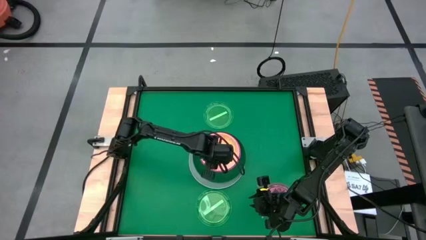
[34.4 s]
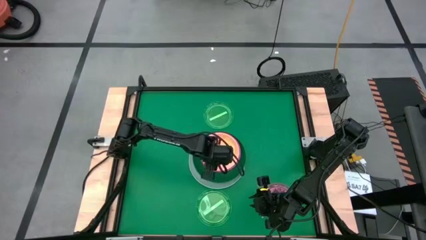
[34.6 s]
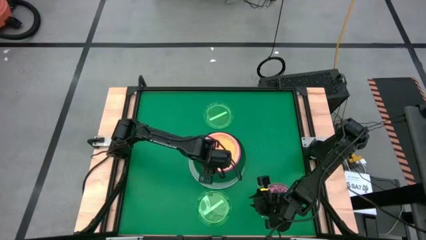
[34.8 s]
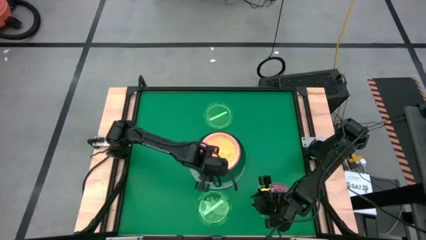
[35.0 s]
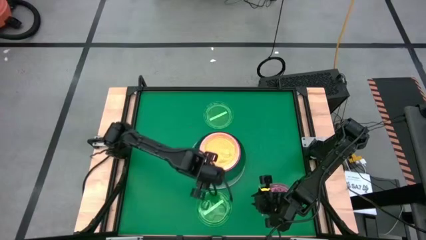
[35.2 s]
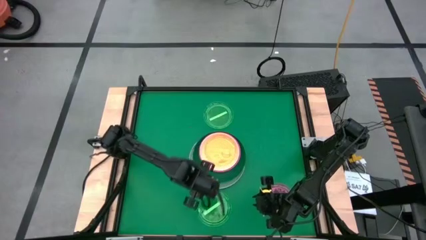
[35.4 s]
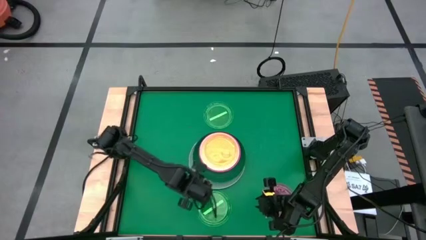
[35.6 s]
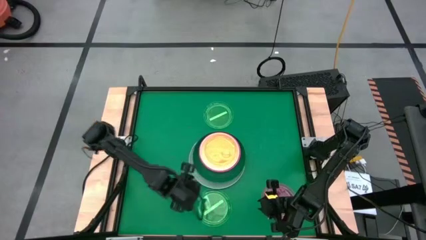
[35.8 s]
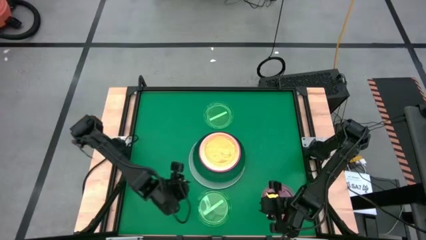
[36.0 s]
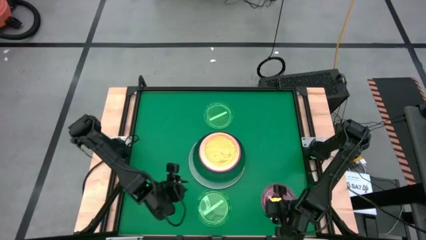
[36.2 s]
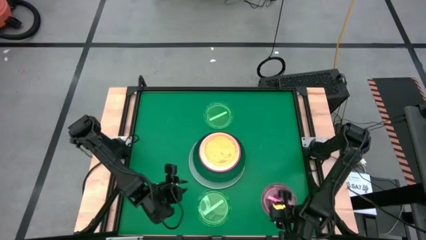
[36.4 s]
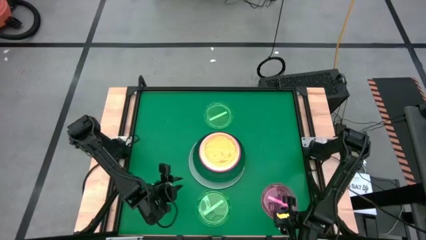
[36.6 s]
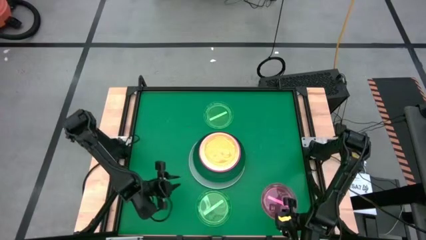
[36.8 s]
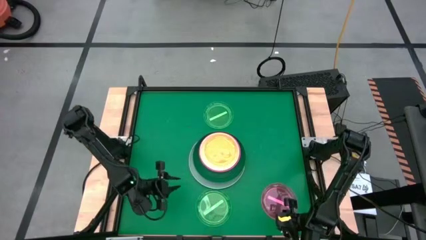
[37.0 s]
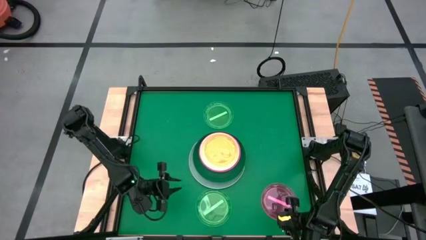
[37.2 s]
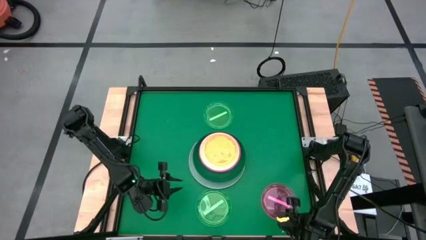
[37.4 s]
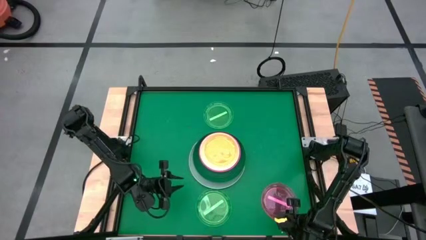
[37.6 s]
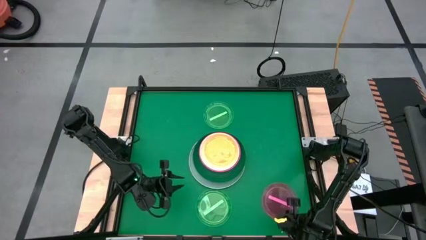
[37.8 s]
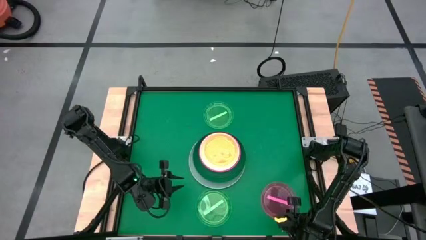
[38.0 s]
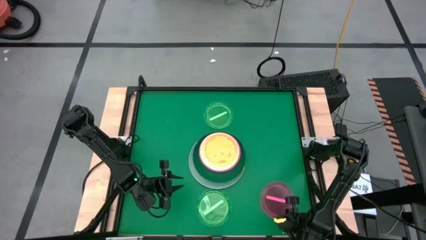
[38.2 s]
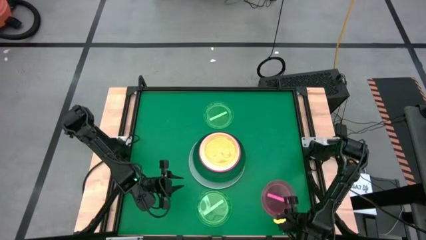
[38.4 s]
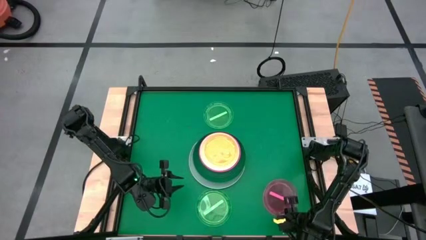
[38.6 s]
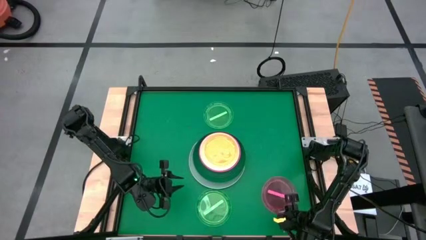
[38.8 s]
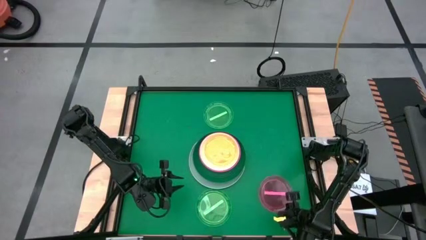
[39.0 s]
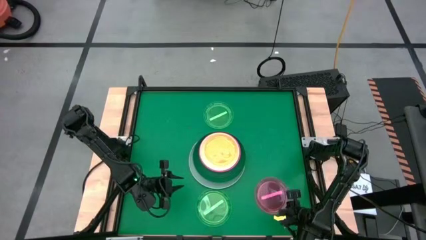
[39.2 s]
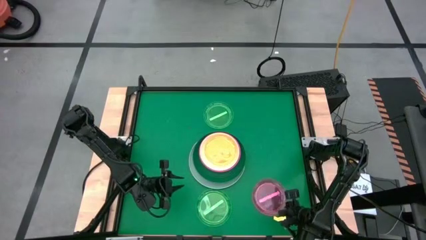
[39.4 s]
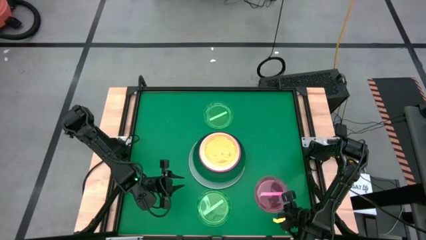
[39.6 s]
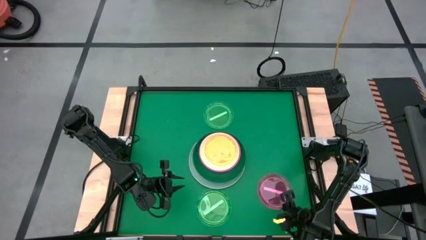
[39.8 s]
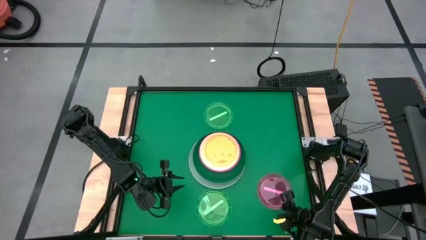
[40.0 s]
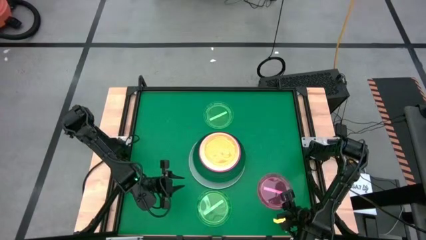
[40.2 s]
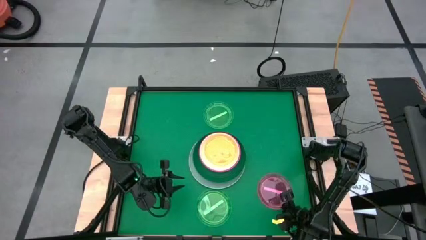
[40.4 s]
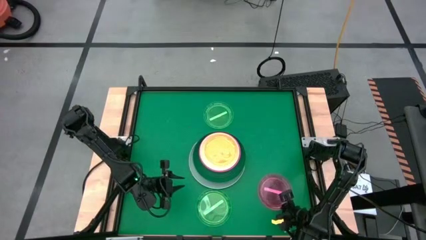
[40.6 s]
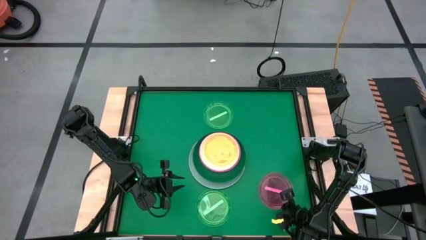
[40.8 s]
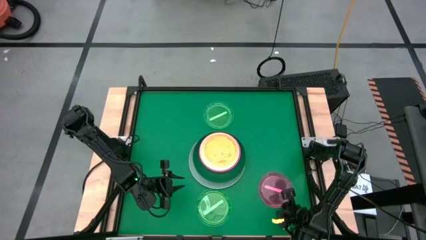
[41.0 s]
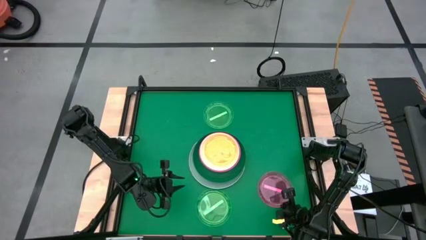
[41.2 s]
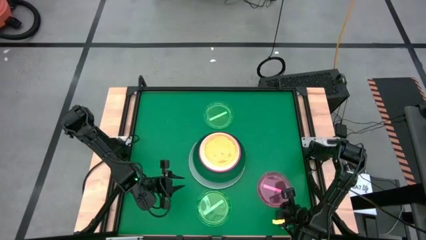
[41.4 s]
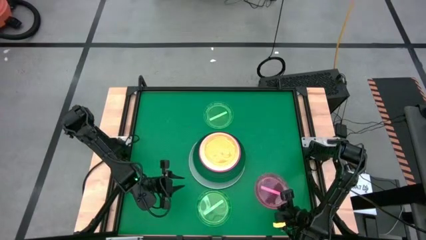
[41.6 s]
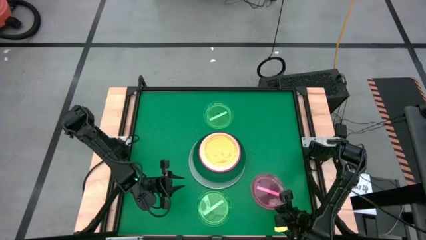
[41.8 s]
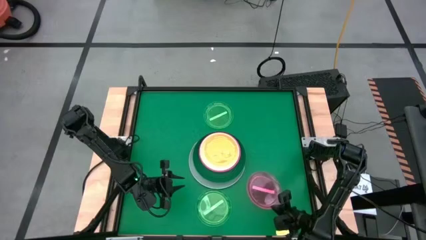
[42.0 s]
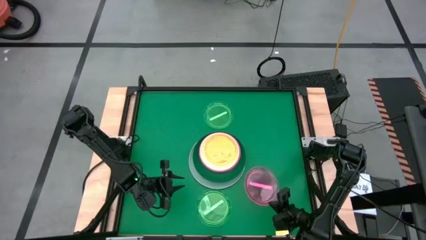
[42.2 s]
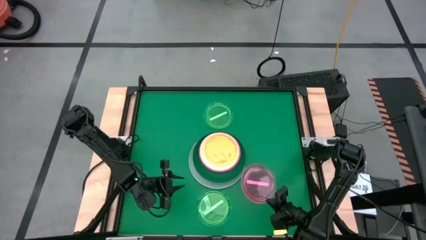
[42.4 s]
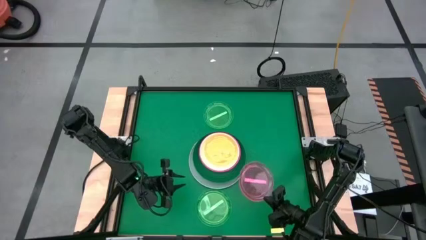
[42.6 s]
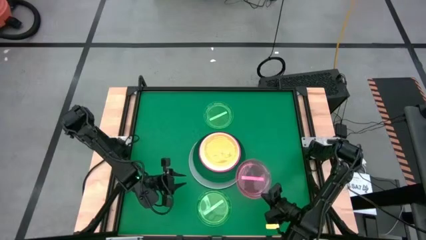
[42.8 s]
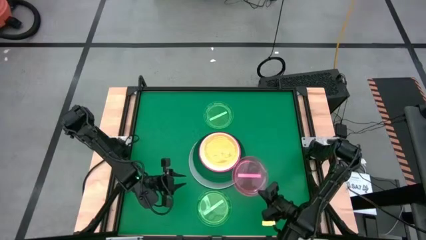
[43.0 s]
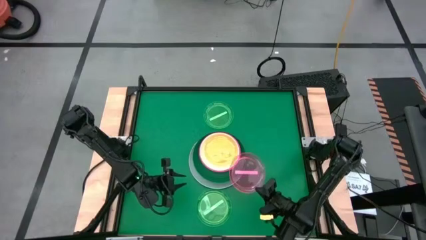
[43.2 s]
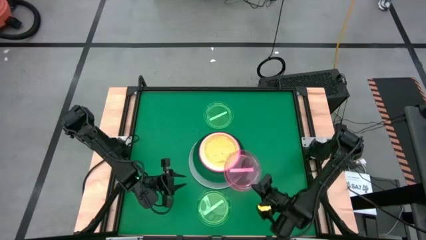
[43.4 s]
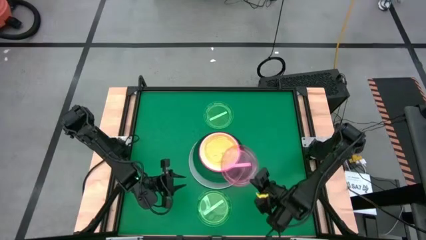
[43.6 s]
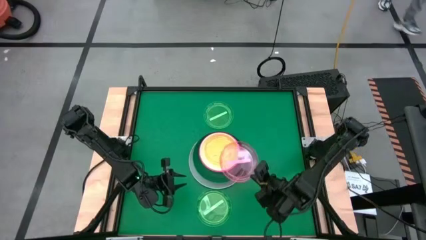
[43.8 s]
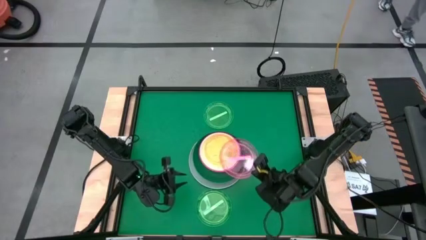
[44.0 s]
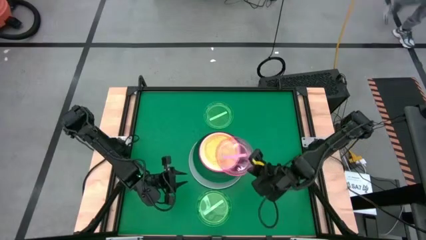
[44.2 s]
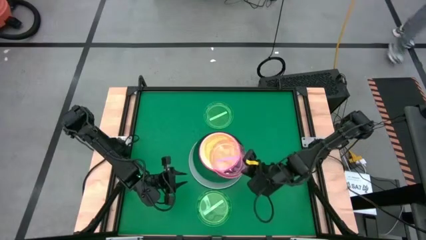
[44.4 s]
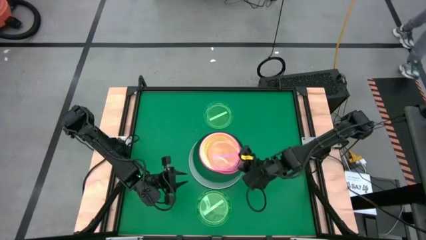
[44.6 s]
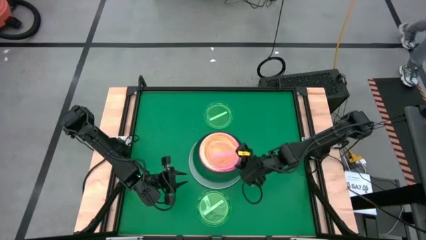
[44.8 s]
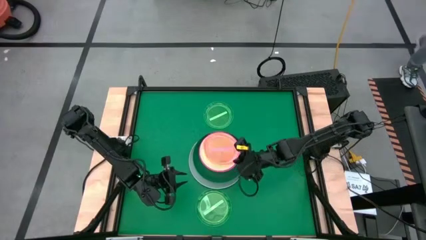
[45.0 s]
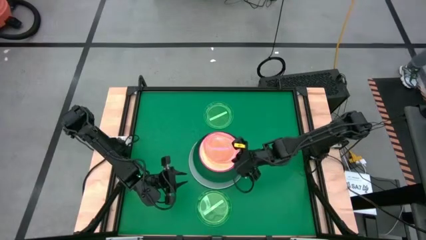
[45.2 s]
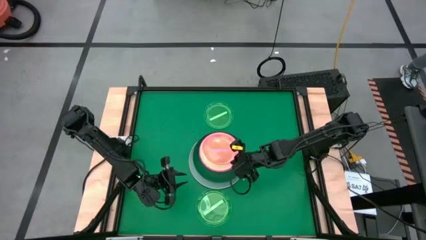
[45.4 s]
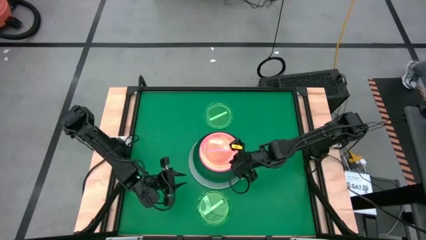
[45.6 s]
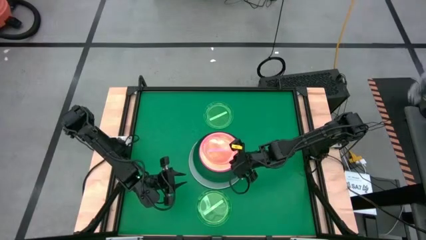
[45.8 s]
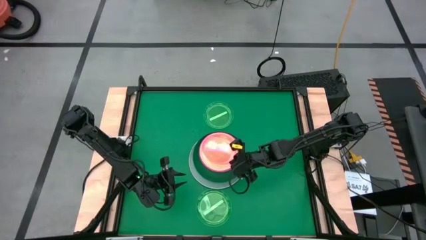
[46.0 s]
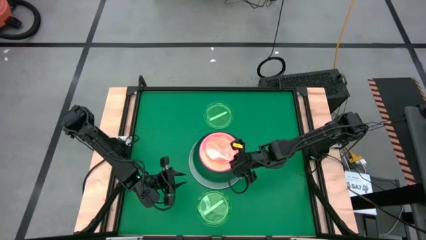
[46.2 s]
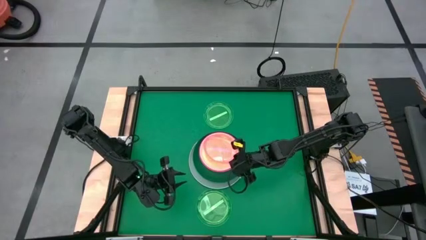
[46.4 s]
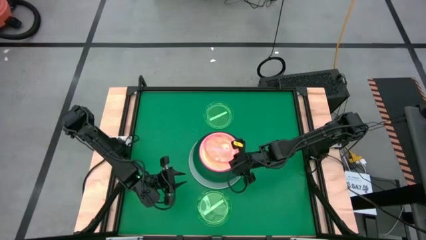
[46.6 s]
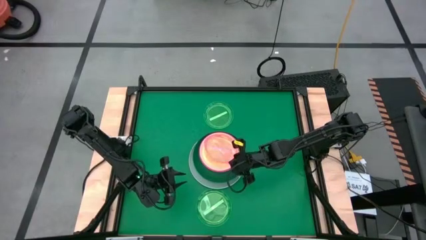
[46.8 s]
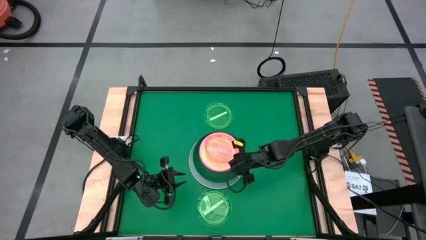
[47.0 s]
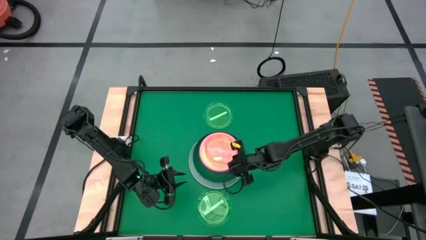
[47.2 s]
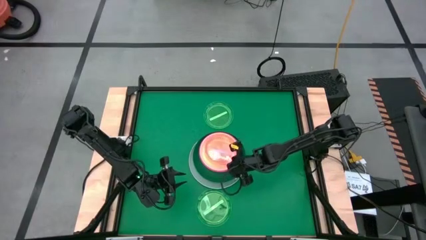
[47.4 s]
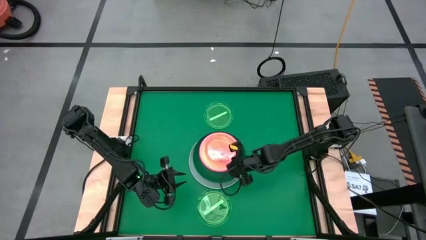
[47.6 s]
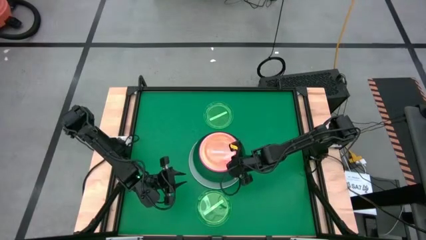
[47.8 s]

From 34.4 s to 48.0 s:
Task: Stack plastic plates
Stack the small pink plate on top of the small orange plate

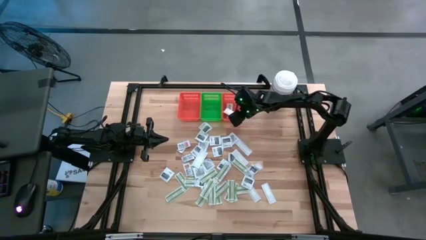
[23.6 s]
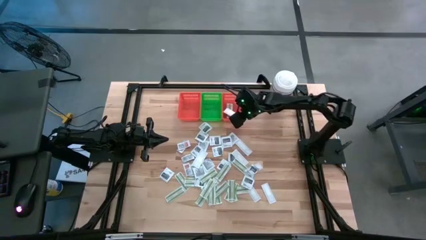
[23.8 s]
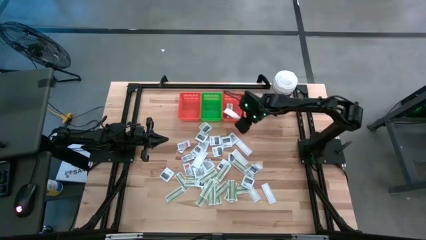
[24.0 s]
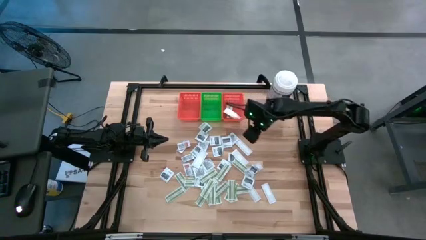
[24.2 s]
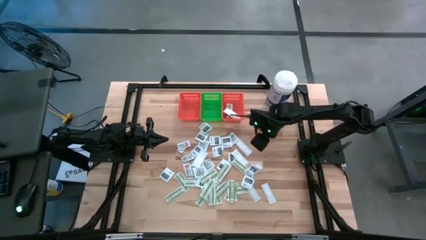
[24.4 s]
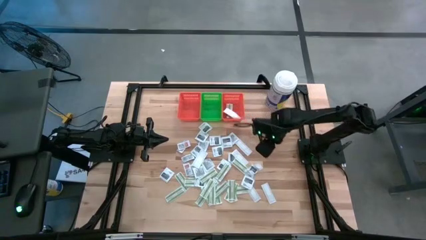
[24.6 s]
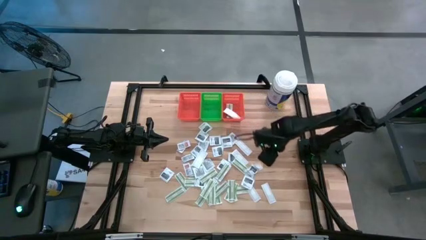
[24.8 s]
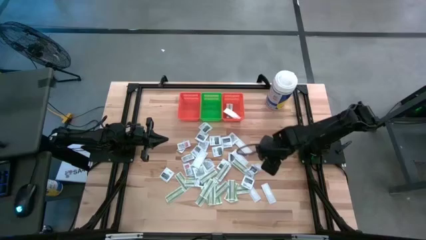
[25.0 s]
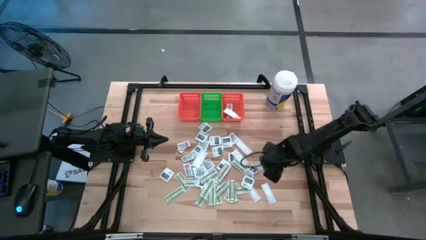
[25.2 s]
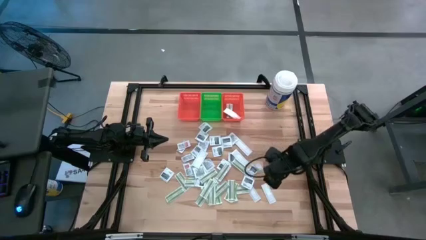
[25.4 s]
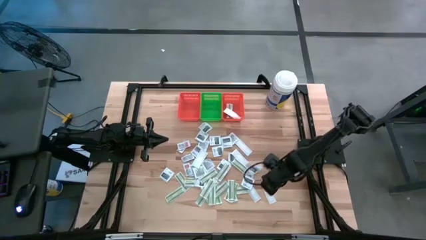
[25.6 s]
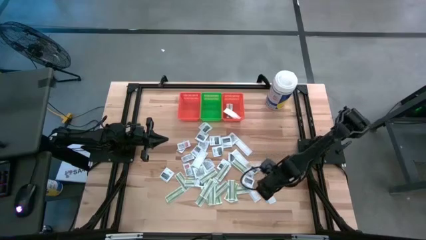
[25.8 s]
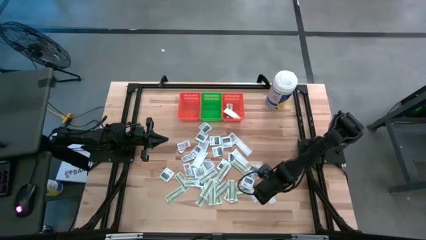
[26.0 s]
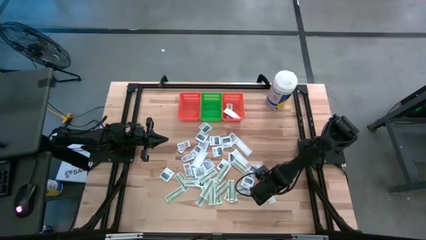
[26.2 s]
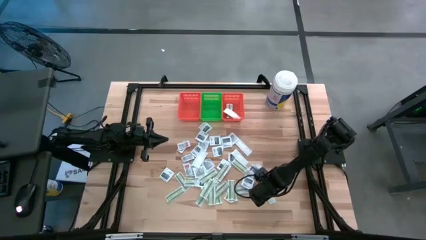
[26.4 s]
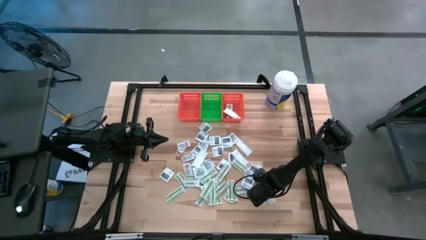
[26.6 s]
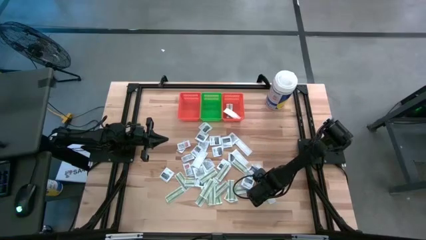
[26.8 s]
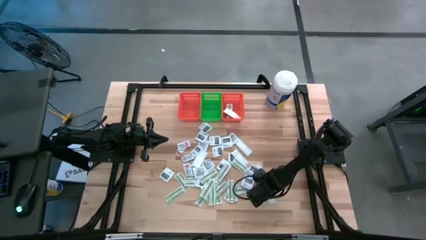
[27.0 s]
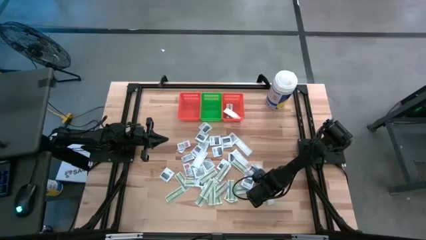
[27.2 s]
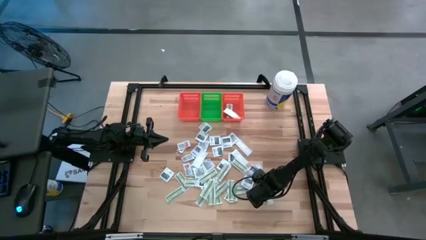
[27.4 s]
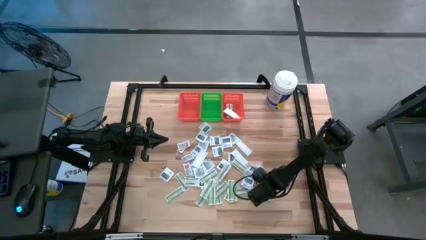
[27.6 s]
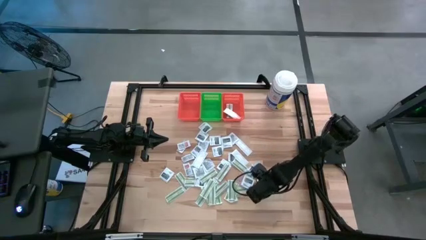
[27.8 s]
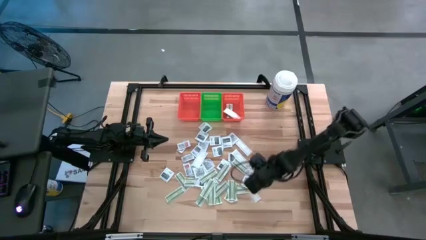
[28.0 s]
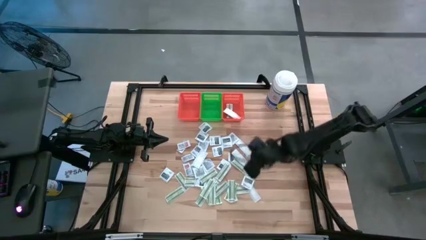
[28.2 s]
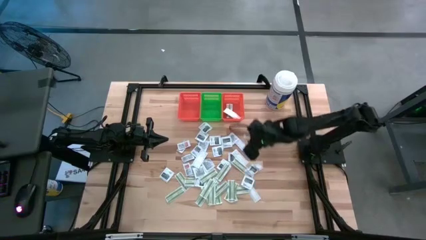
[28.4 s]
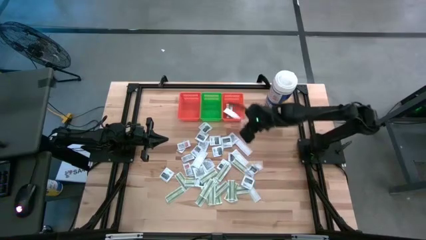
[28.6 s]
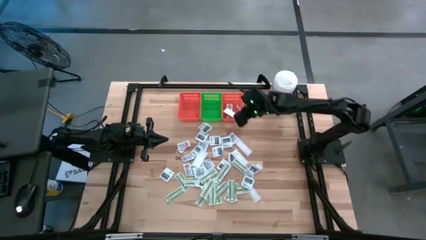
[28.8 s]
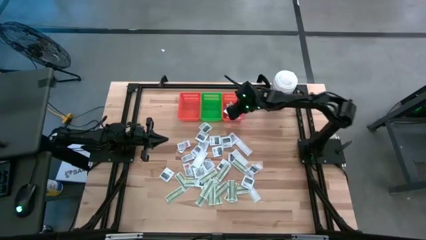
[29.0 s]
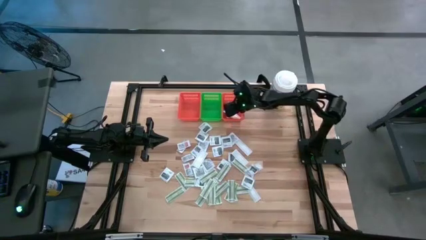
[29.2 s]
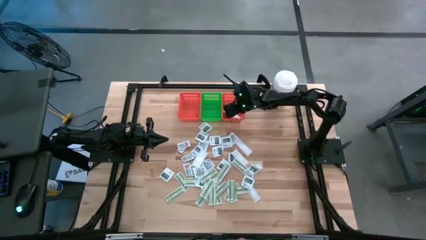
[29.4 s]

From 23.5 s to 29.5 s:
Task: Pick & Place First Aid Supplies
Put the bandage pack into the right orange bin
